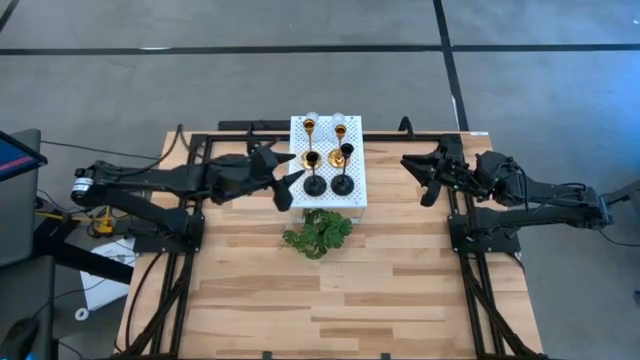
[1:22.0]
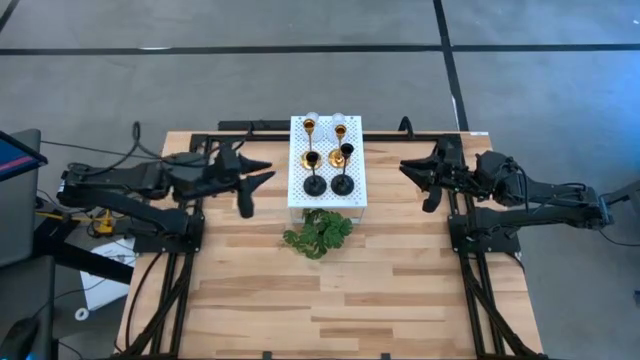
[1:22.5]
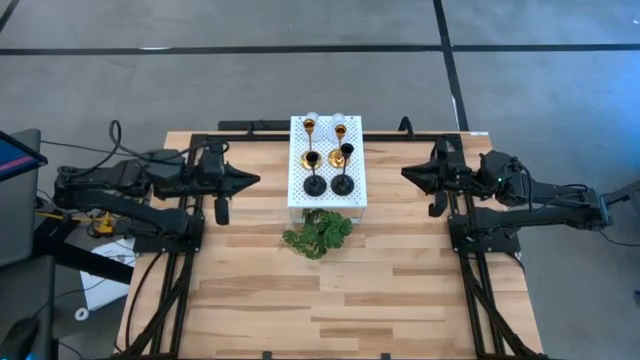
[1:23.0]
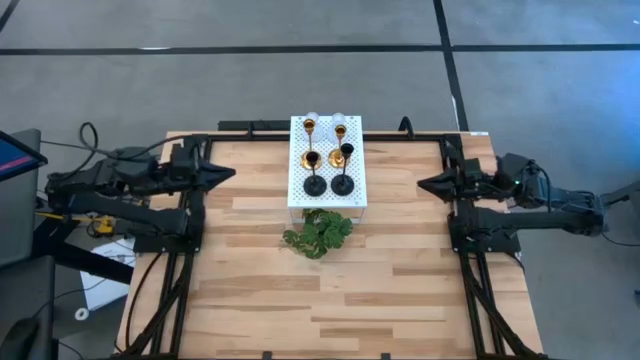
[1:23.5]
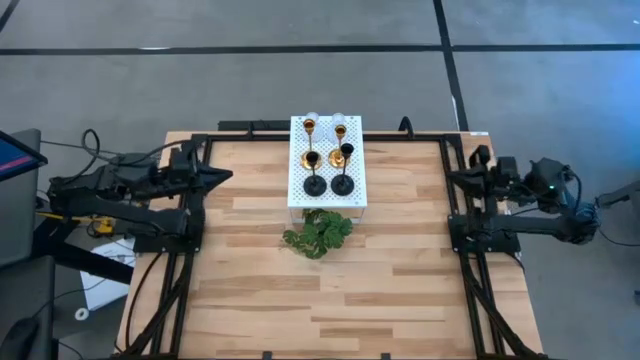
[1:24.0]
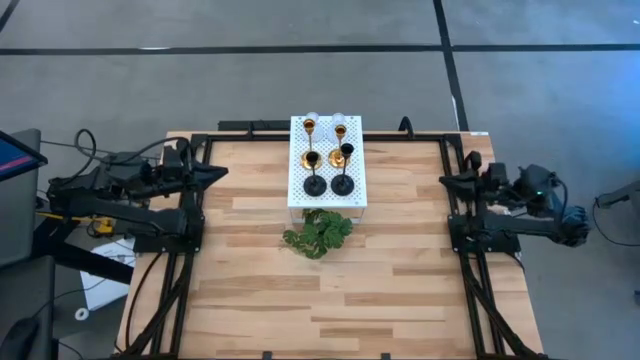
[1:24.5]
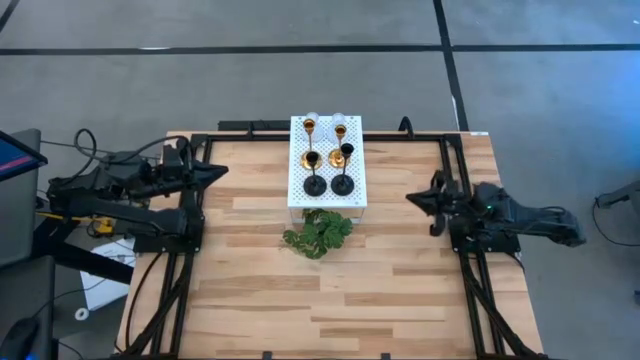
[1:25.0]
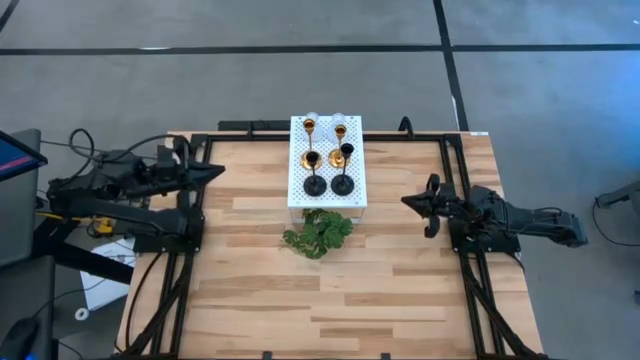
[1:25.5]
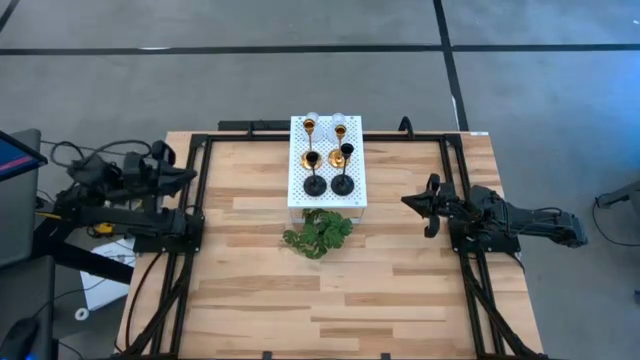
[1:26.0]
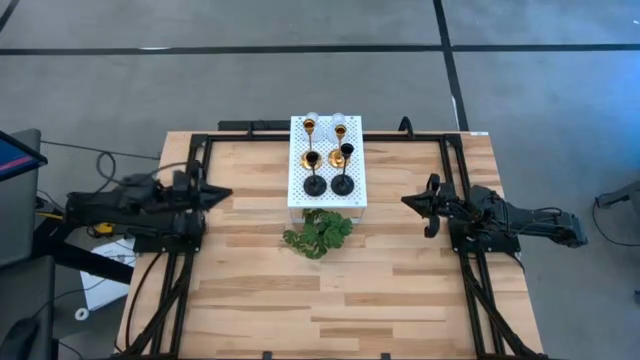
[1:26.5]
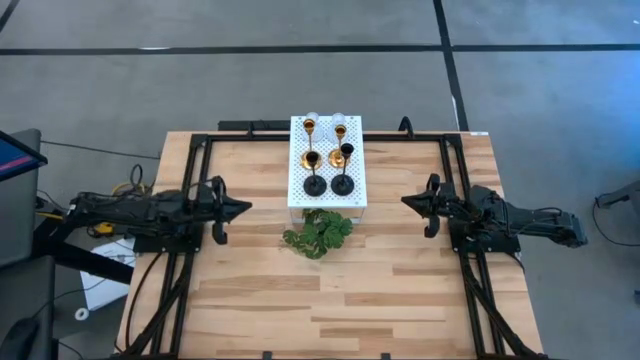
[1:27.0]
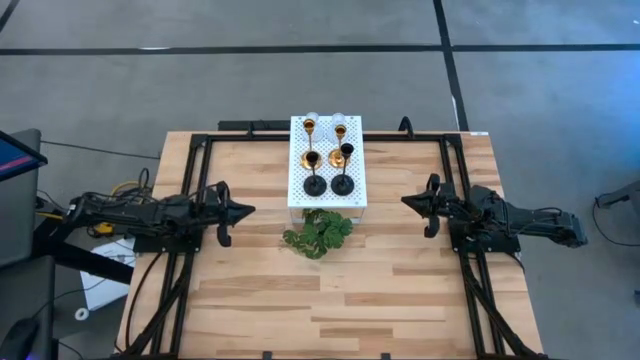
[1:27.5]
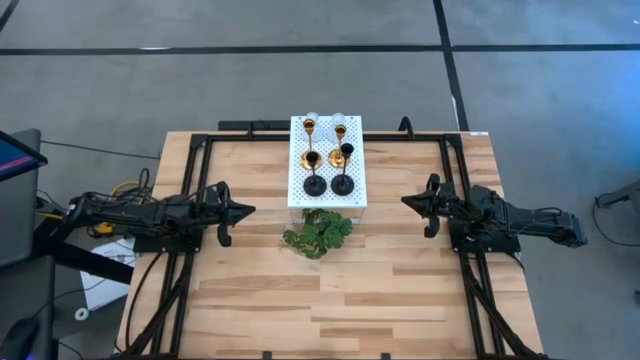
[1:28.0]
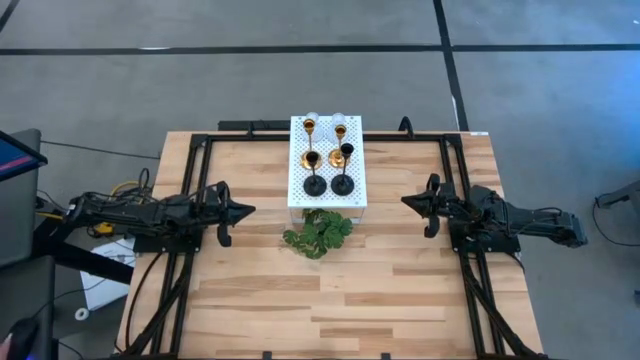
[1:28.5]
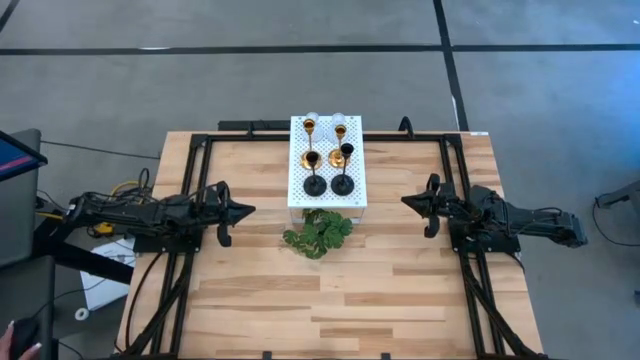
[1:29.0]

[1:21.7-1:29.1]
Task: Pick & Place candle stick holders
Return to Home Position

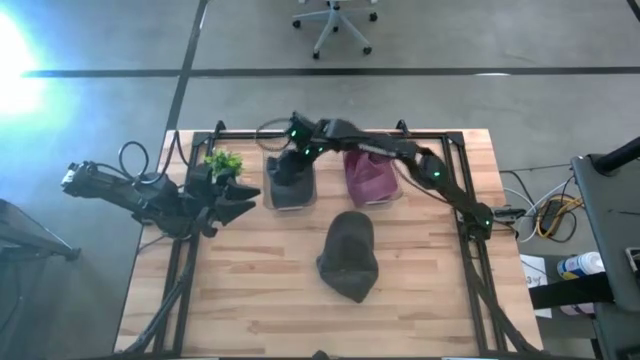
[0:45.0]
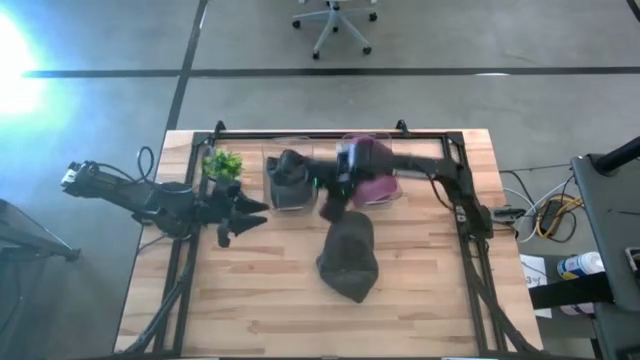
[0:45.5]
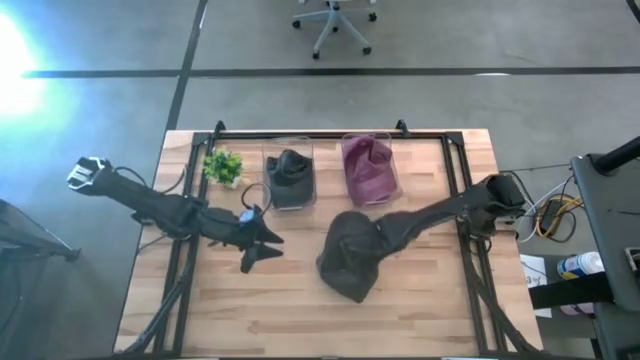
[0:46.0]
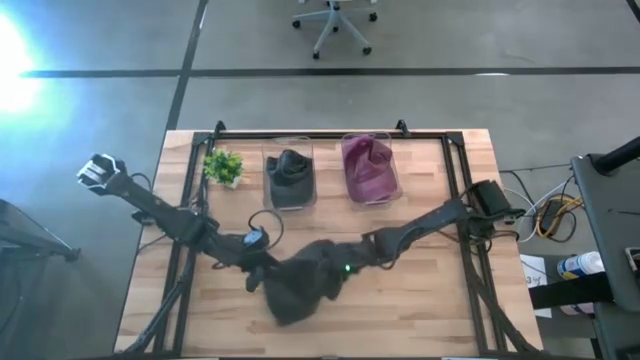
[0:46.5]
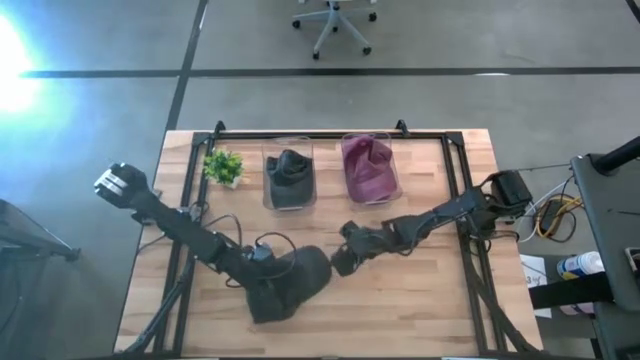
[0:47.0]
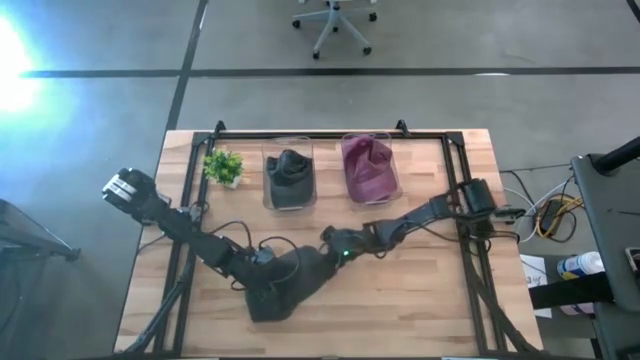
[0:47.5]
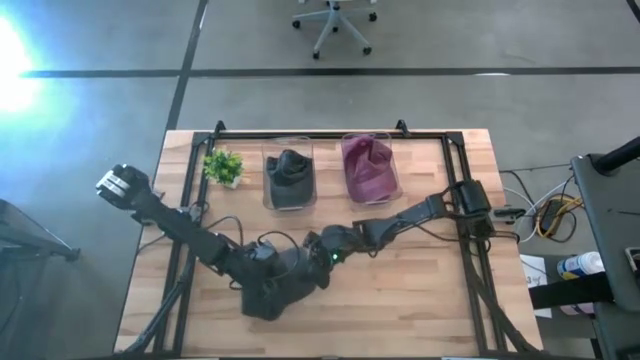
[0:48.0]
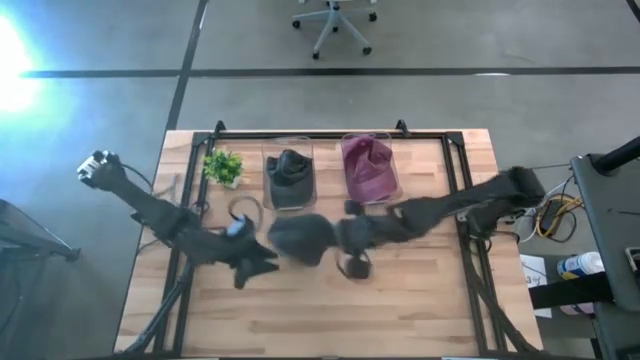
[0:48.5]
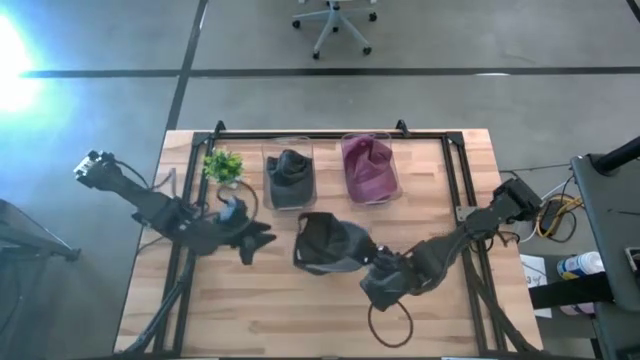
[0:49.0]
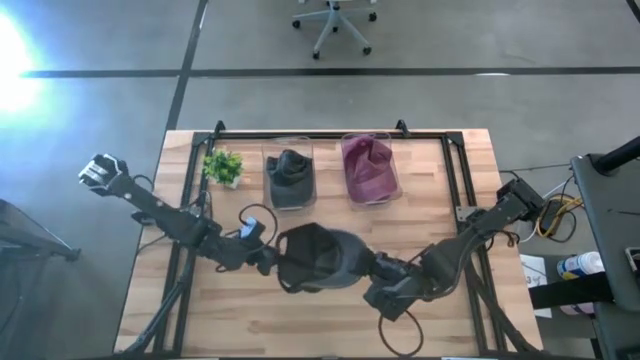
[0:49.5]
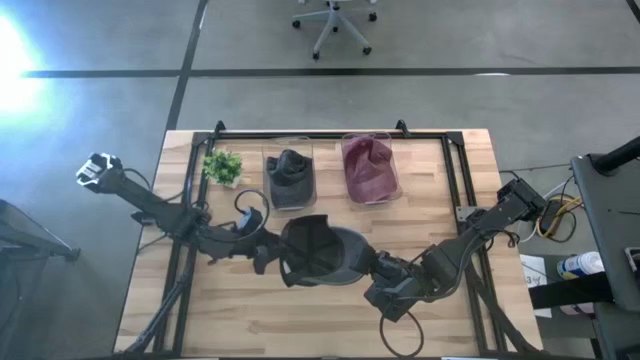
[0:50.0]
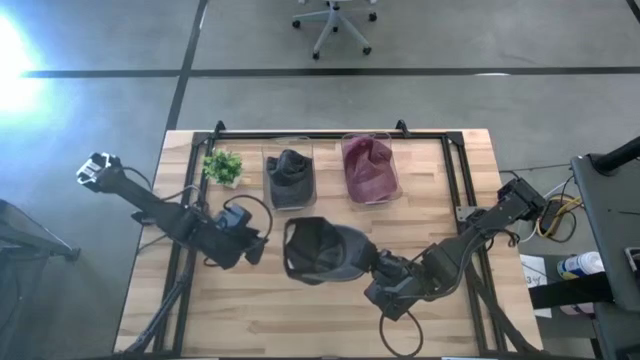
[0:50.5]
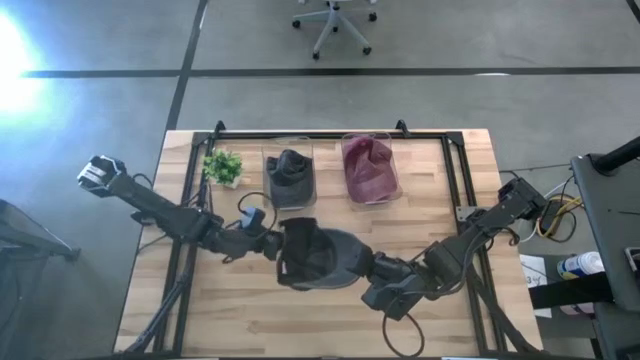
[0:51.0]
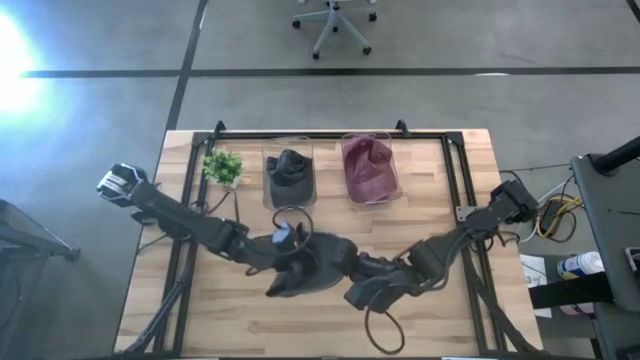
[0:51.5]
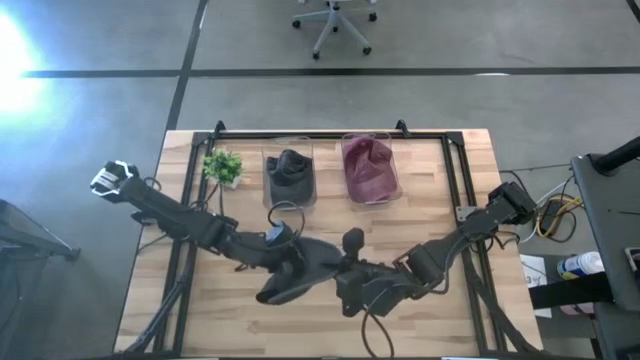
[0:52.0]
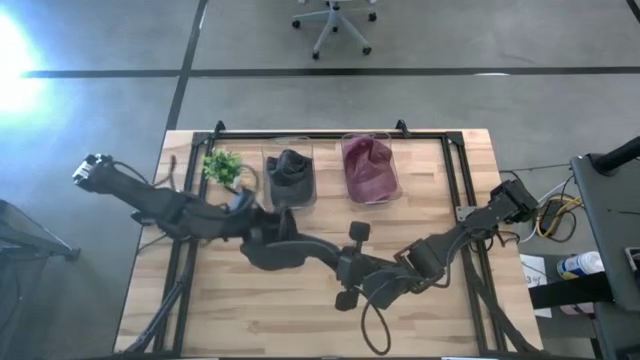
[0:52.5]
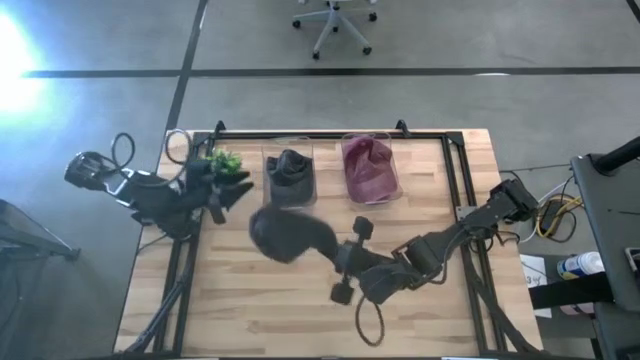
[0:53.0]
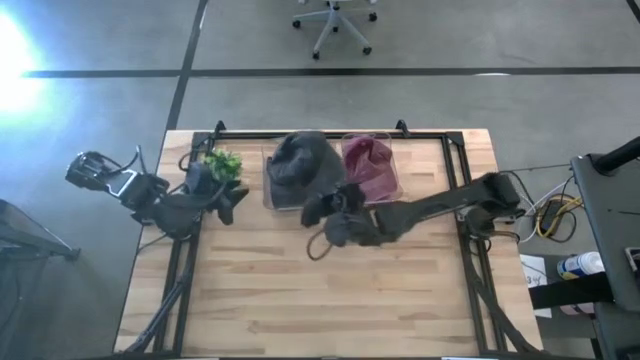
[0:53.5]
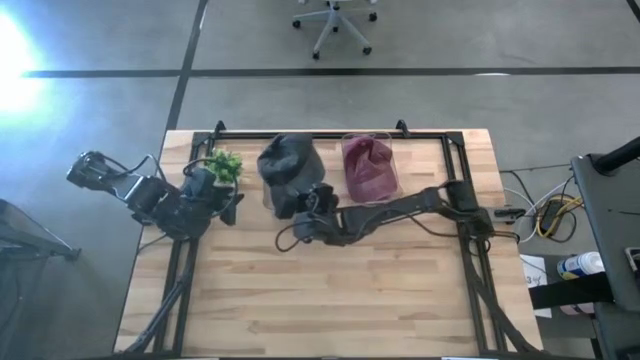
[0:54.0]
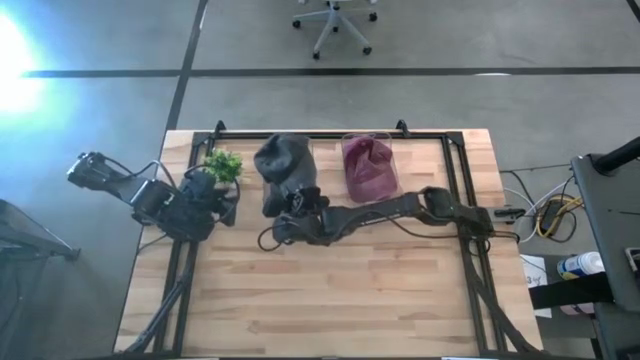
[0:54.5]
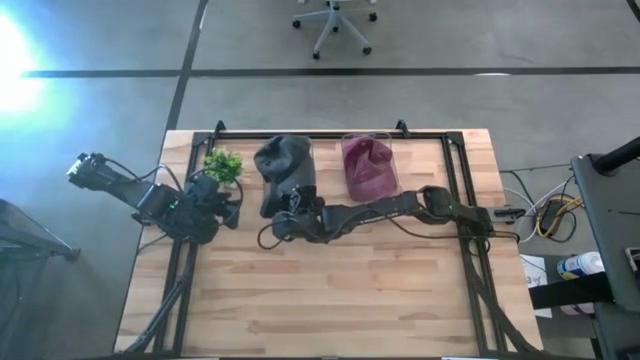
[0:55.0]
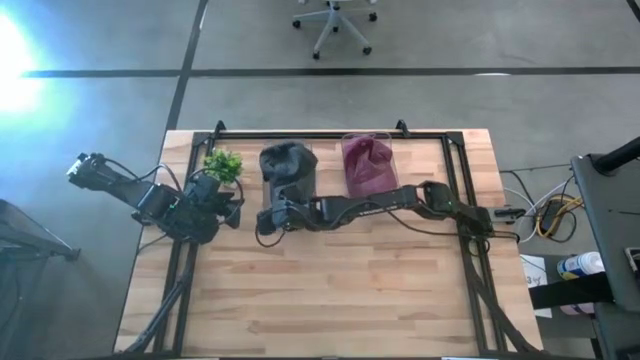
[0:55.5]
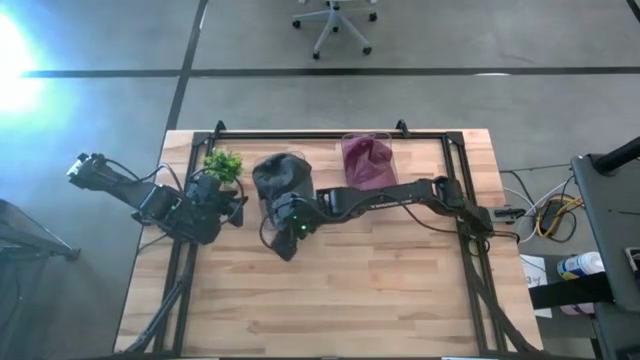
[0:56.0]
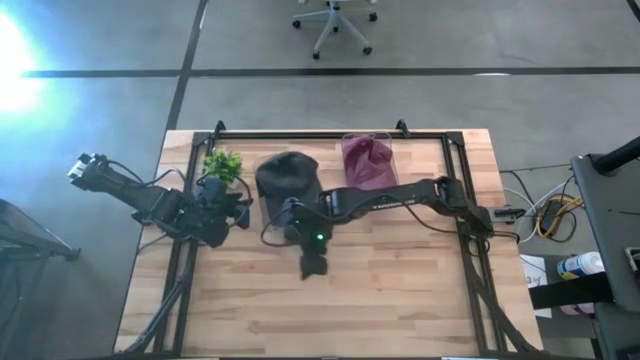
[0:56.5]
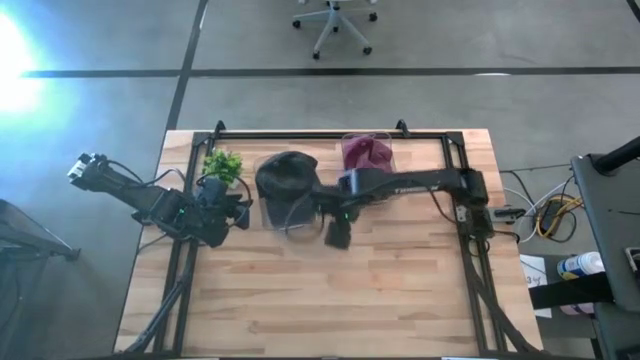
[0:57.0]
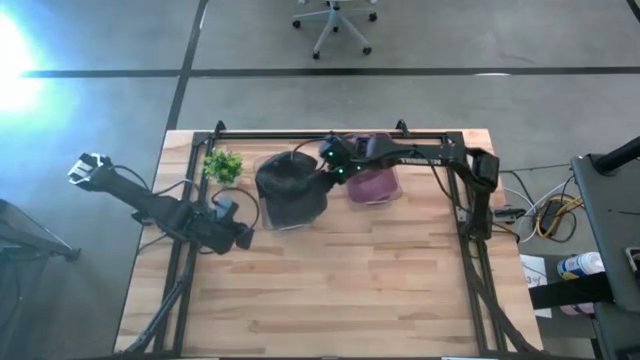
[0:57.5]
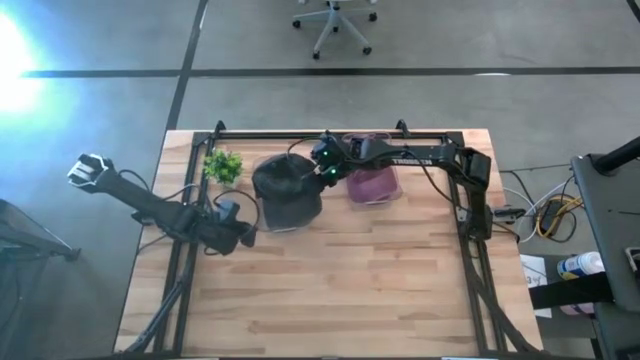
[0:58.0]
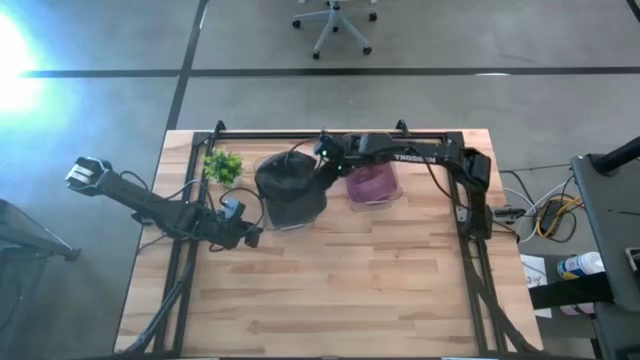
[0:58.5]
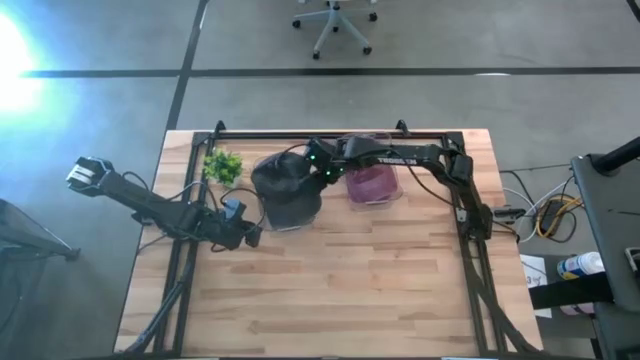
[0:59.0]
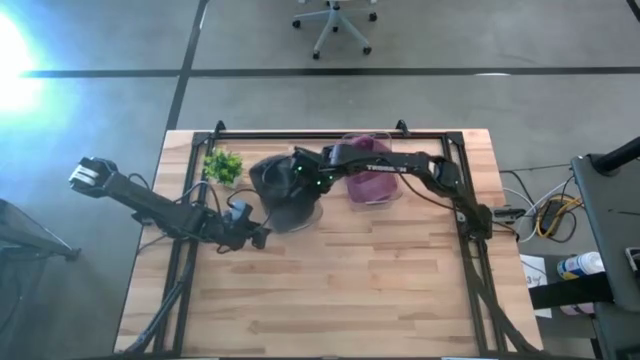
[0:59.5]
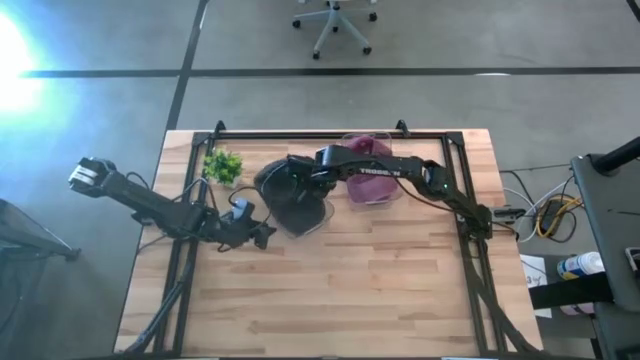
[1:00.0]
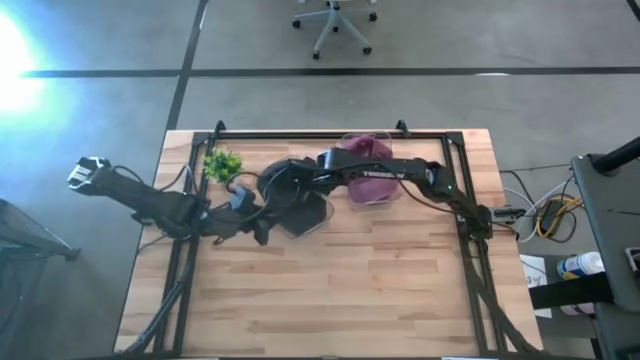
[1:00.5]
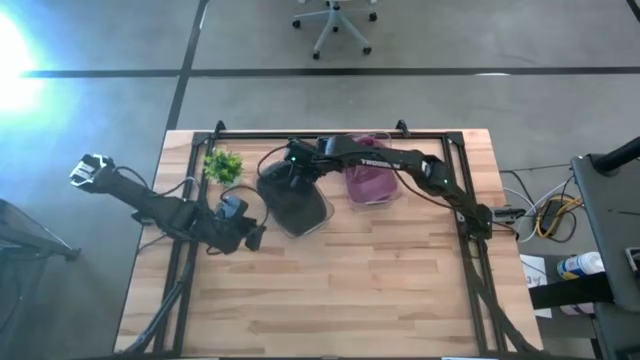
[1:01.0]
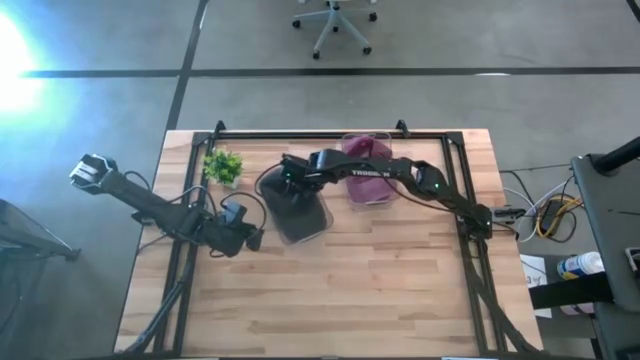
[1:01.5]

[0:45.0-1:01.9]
Task: Pick & Place hat
Put the black cap into the transparent bin
